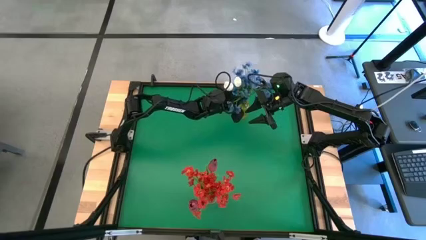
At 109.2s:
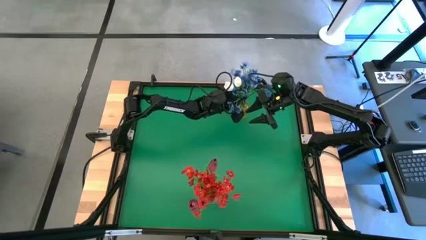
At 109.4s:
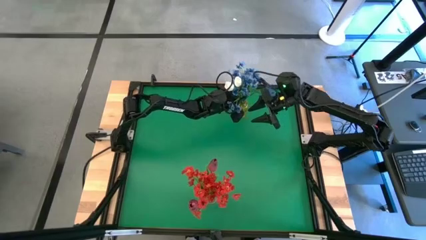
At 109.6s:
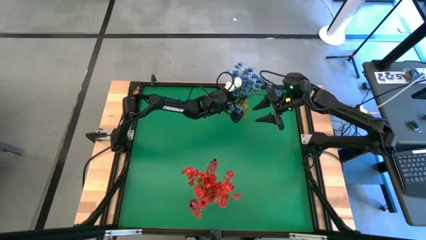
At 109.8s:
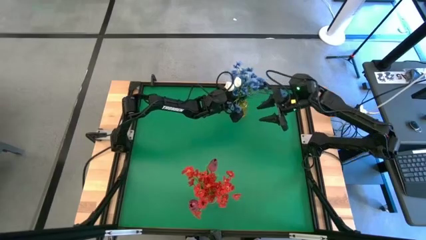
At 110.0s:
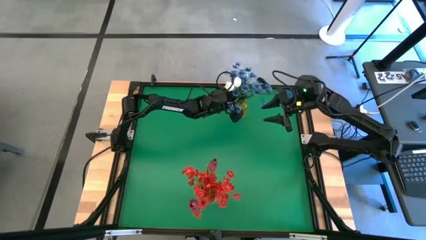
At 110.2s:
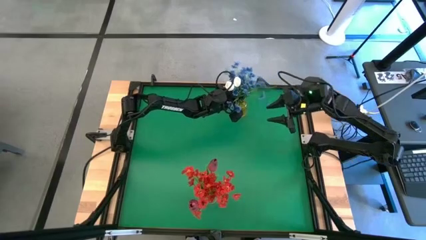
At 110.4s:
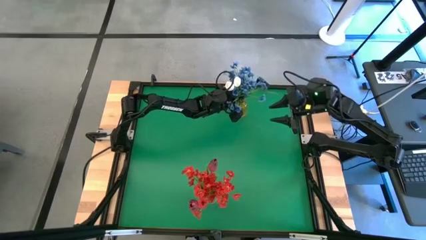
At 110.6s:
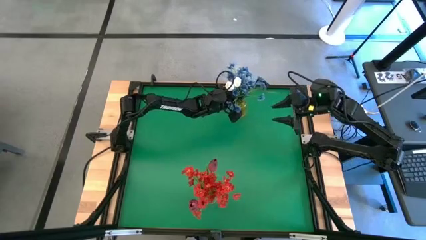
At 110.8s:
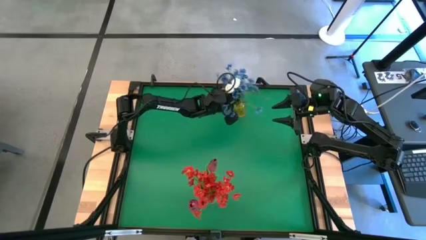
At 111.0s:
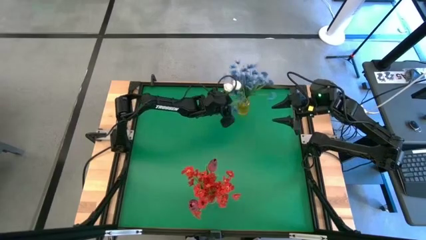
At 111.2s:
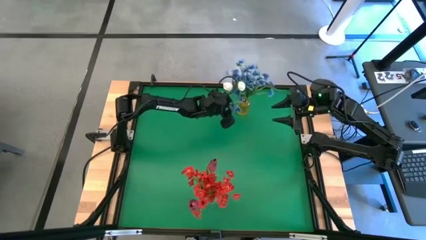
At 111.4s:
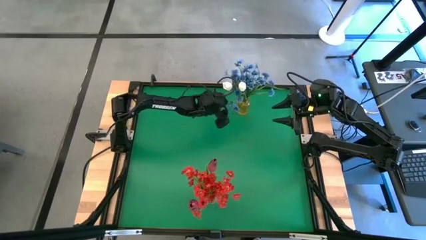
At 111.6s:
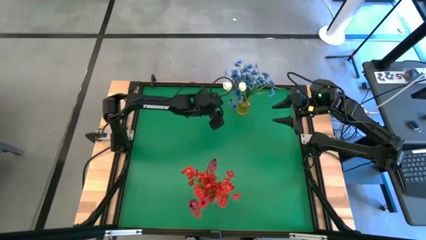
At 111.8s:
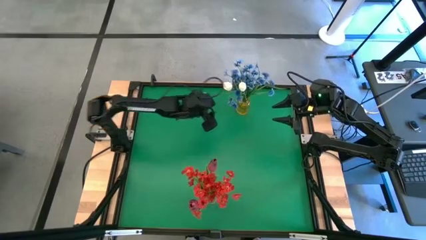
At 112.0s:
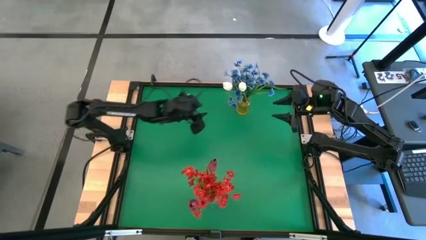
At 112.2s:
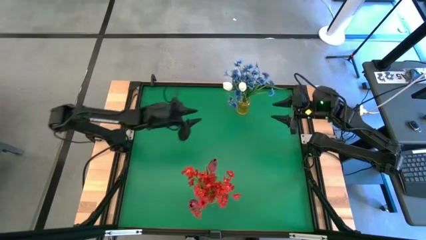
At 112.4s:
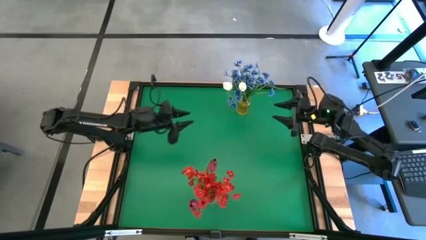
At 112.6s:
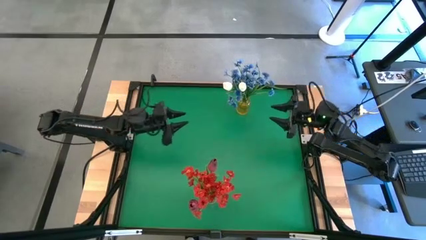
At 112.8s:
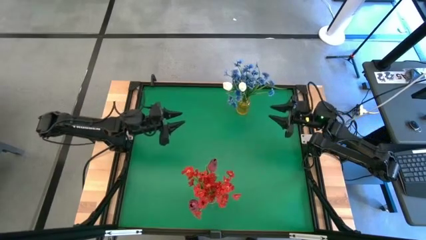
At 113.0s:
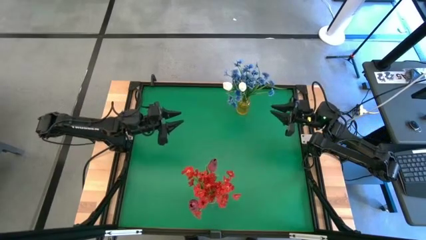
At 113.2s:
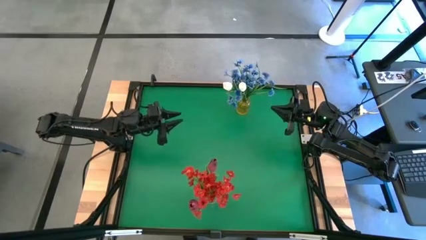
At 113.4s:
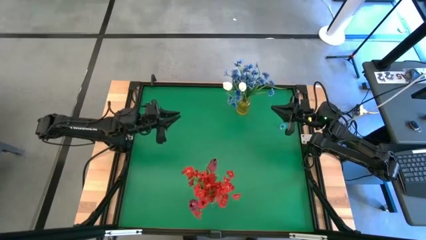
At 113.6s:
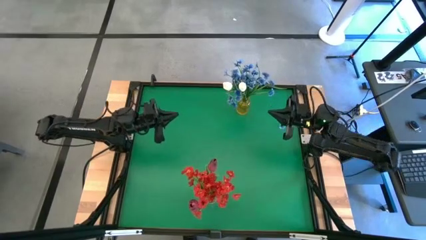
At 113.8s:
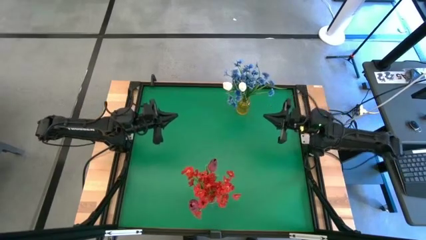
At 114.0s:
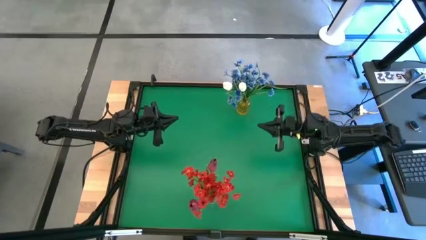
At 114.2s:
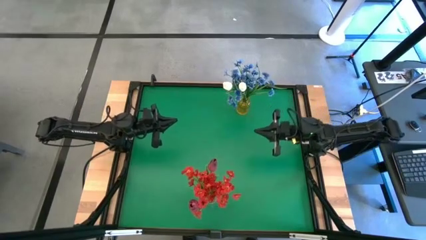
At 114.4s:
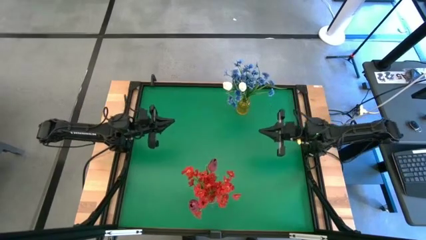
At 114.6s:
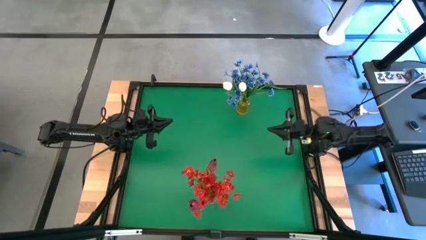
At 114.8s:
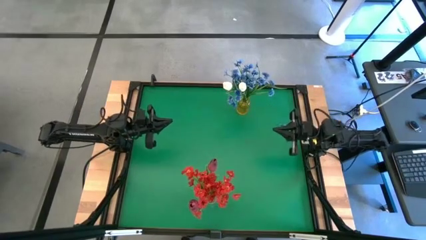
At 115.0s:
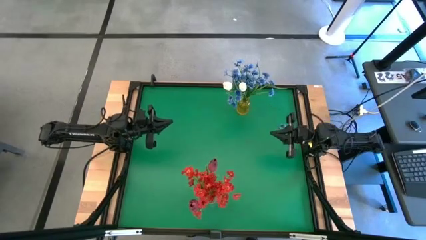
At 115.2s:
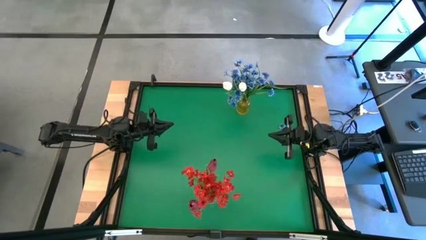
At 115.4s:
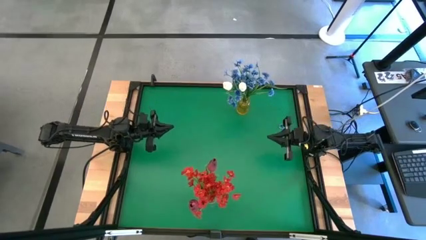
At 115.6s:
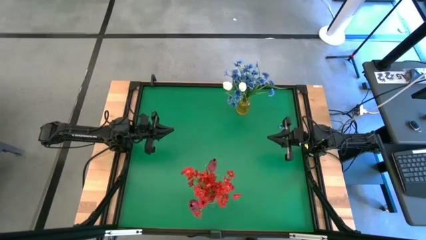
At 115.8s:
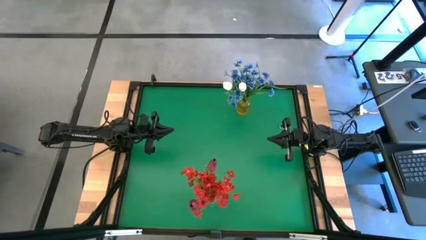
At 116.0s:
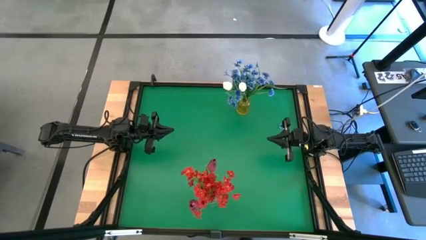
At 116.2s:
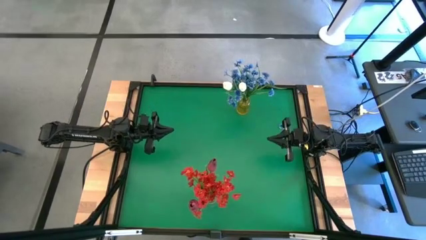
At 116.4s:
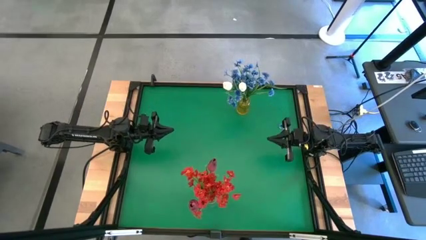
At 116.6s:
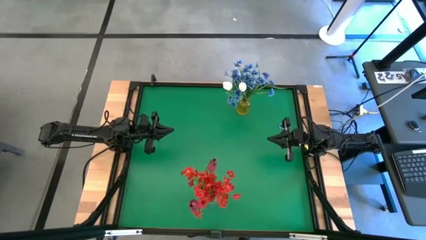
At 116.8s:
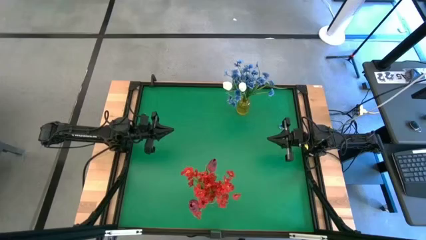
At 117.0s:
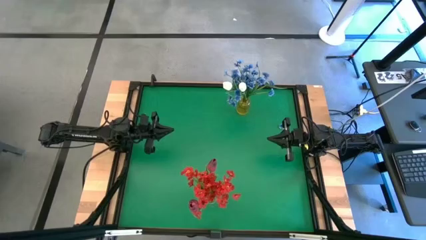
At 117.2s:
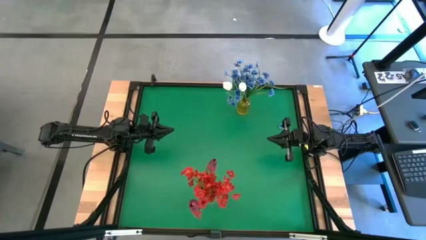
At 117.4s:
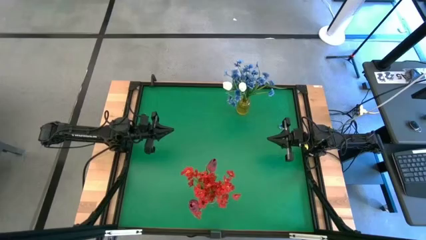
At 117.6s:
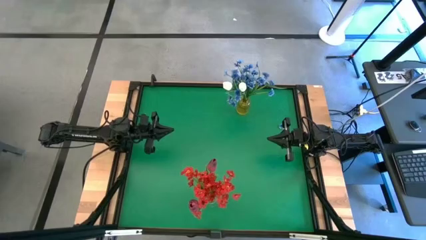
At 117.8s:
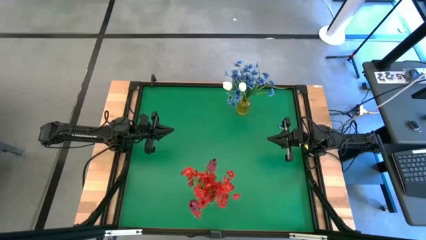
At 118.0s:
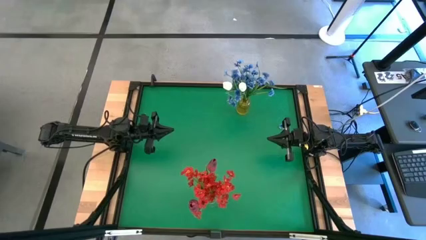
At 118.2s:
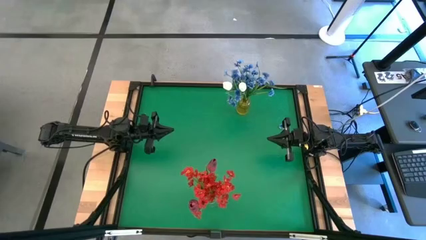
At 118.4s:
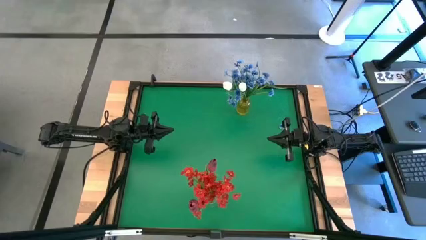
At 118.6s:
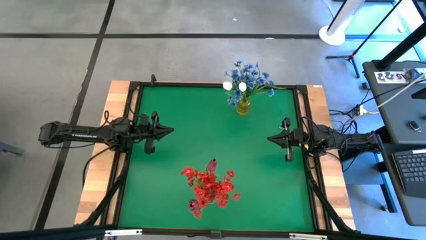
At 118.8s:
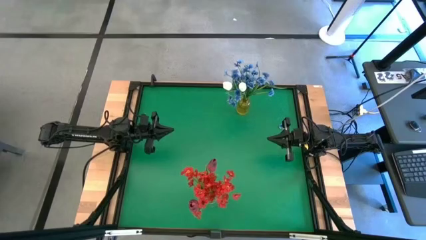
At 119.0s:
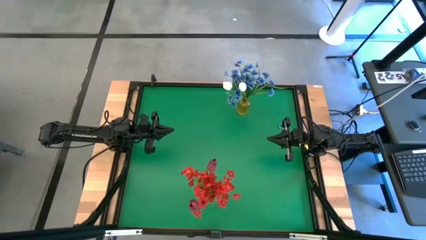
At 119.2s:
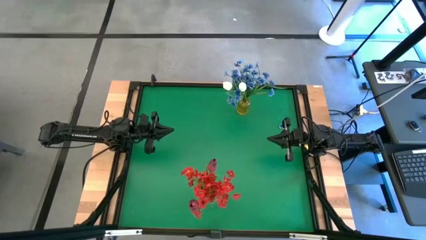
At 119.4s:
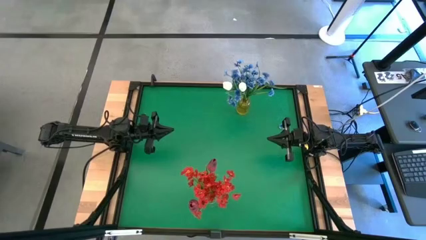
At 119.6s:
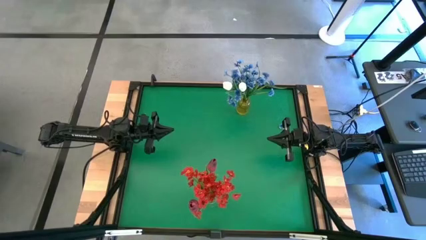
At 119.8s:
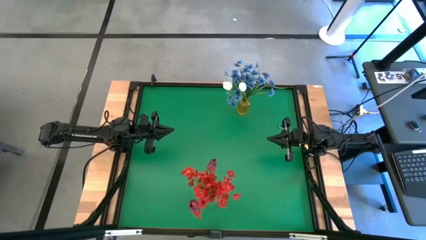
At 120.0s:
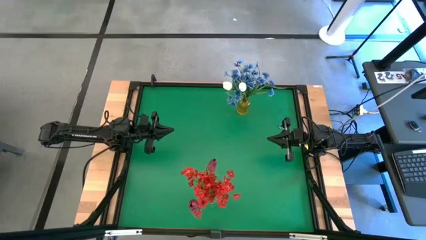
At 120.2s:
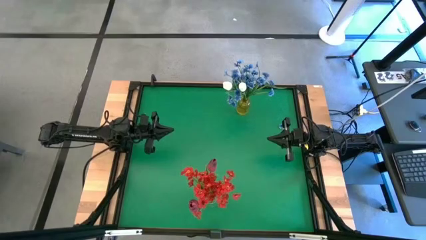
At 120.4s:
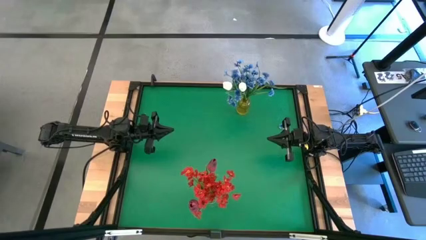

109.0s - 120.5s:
Task: Sort flowers into vase by color
Return to Home Position

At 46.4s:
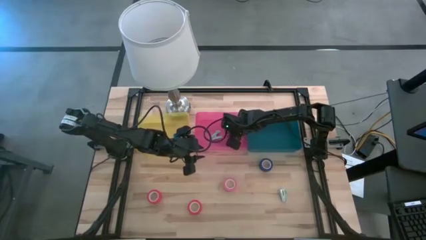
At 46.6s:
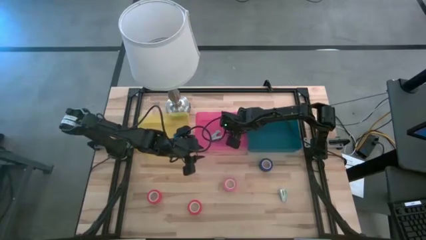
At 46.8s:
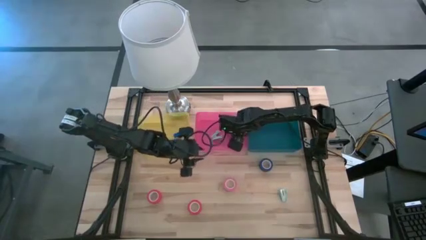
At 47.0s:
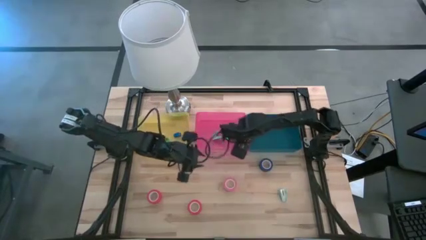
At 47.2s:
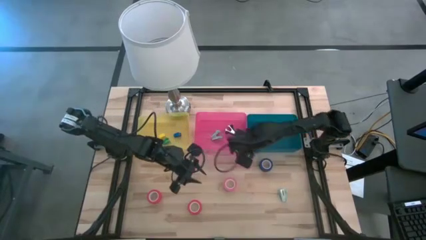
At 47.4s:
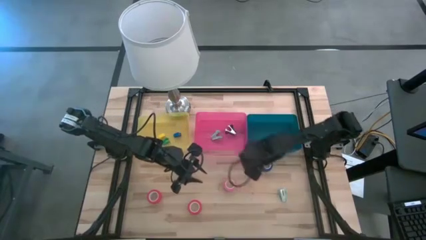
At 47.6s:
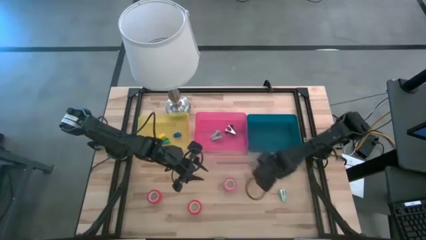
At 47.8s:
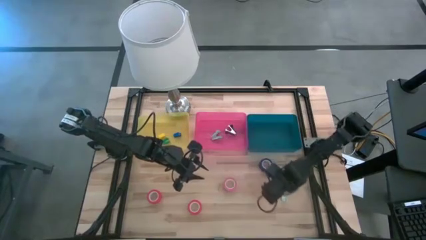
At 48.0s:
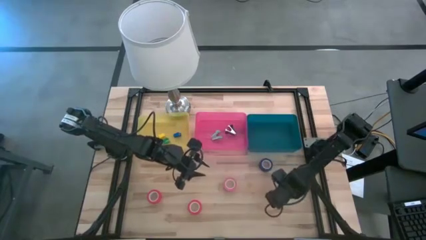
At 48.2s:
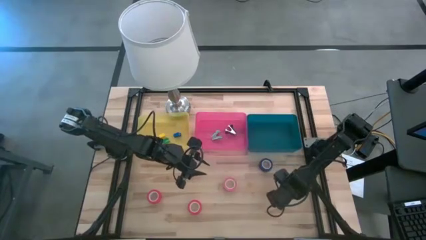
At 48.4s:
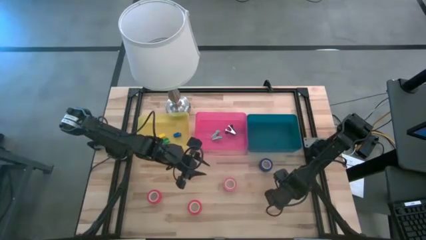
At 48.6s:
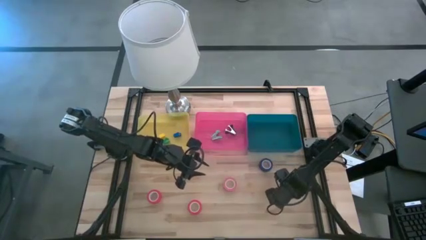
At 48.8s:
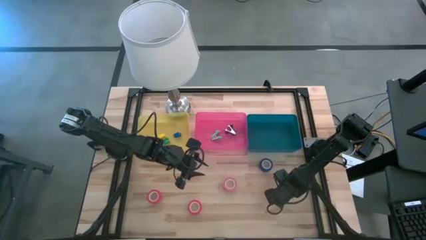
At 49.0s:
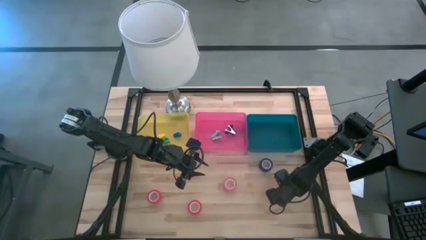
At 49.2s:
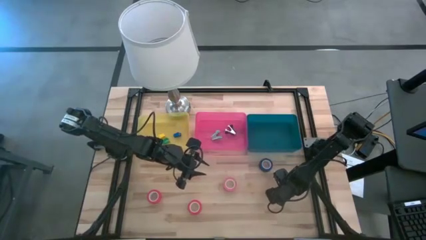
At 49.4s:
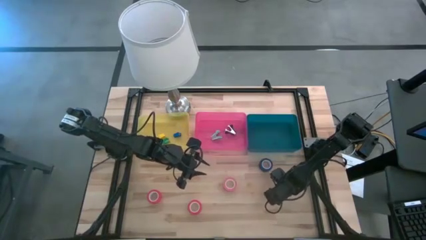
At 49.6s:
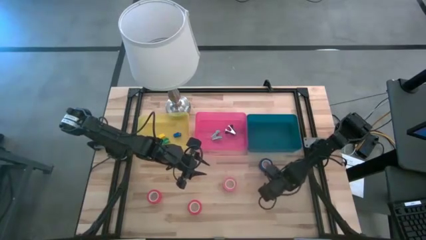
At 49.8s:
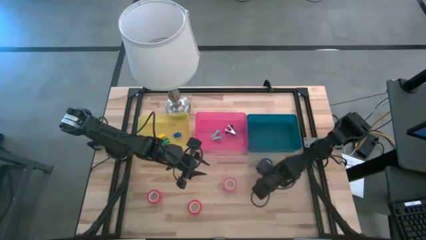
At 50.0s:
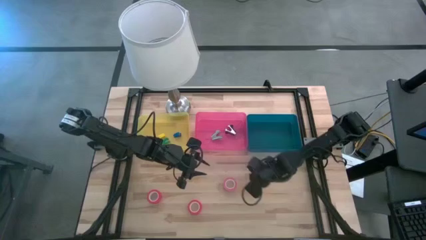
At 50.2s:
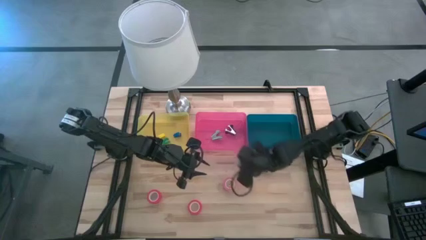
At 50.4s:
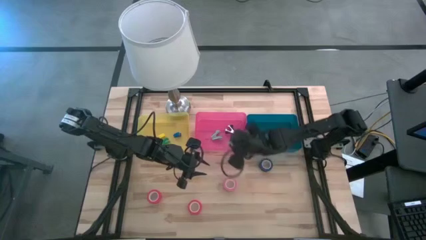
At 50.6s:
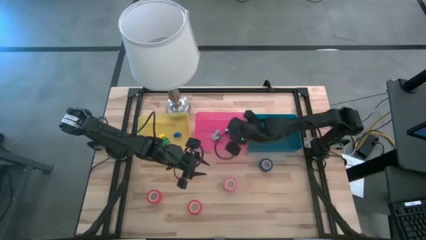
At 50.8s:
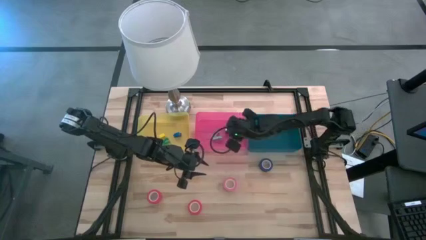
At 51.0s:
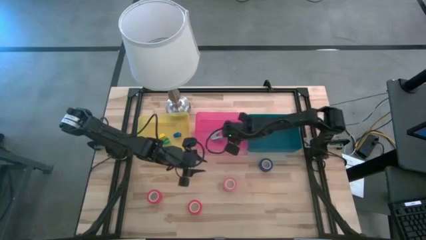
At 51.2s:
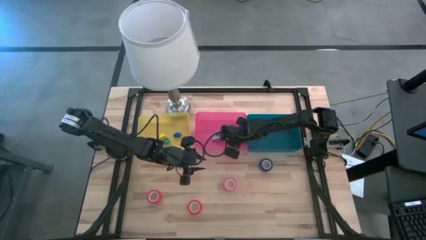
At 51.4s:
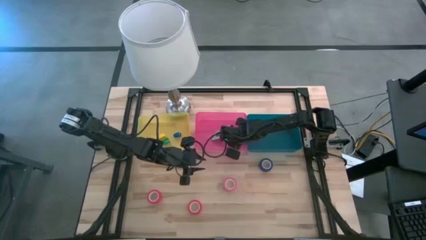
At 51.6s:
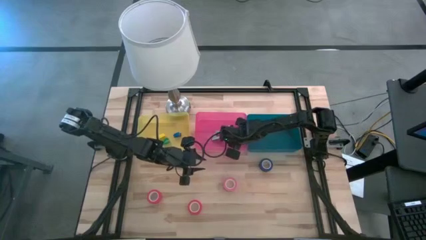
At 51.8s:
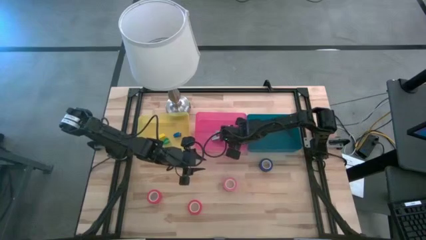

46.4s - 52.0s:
Task: Pick and place Stapler, Stapler remover, tape
Put the light blue staple remover into the pink bin
